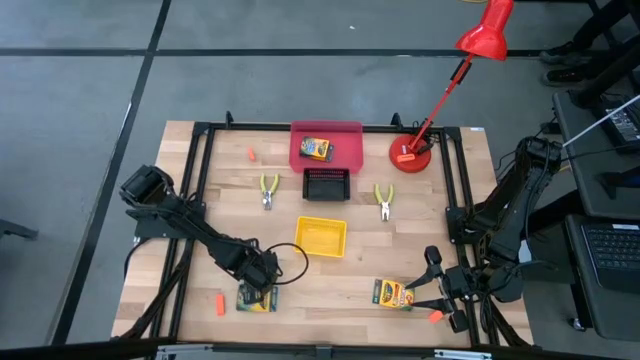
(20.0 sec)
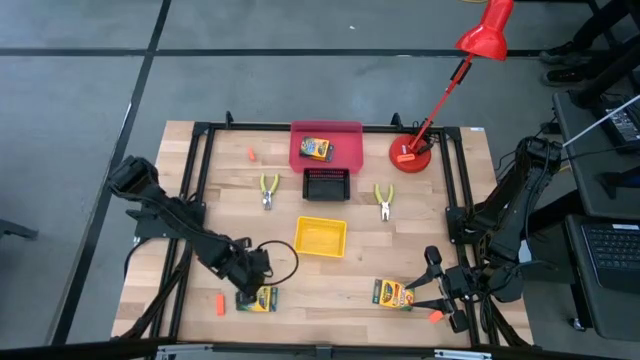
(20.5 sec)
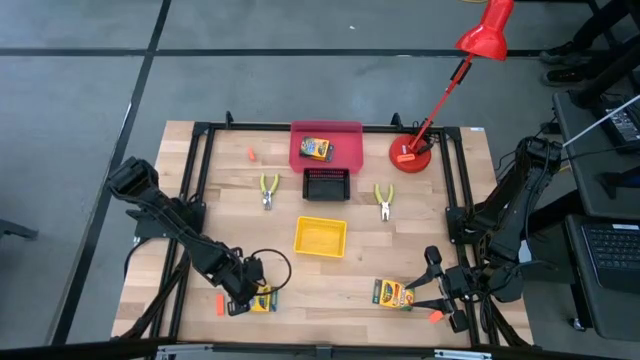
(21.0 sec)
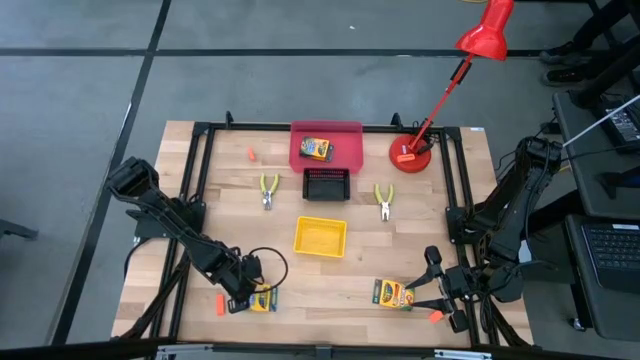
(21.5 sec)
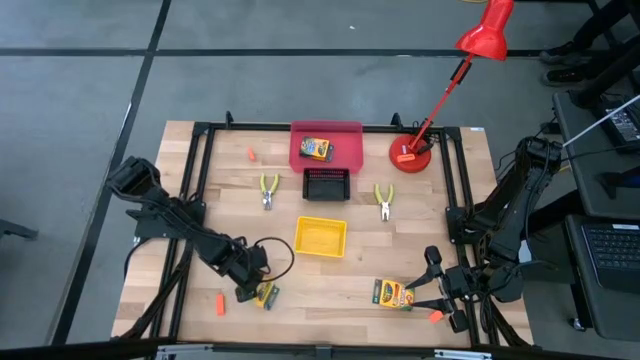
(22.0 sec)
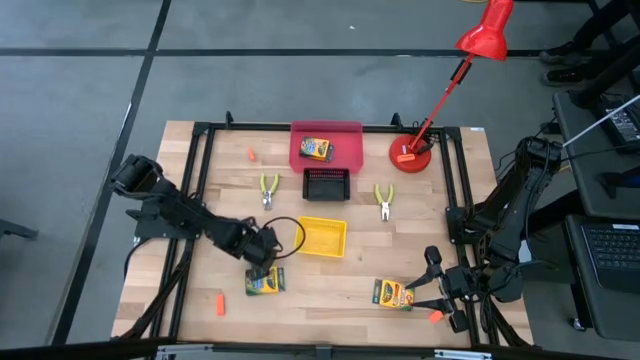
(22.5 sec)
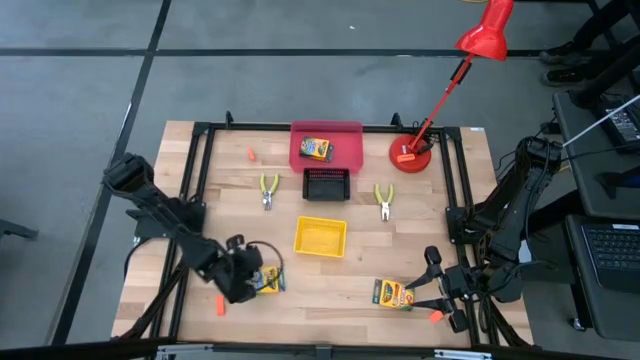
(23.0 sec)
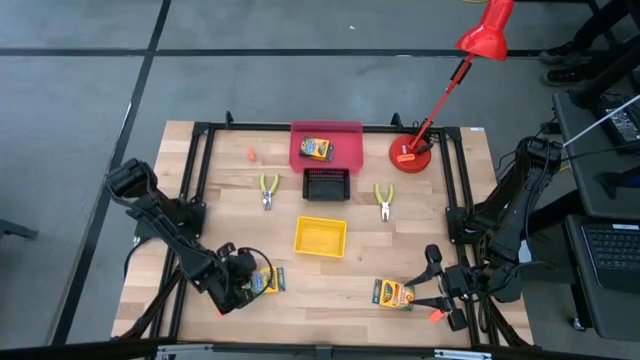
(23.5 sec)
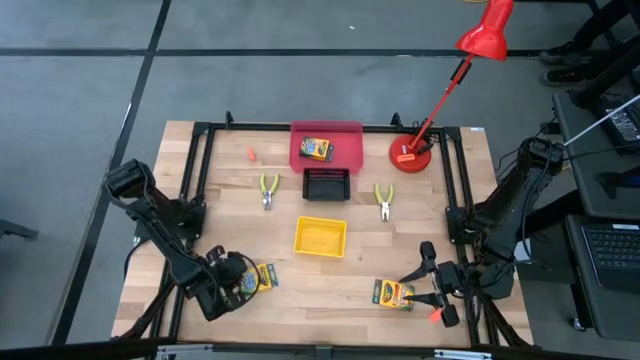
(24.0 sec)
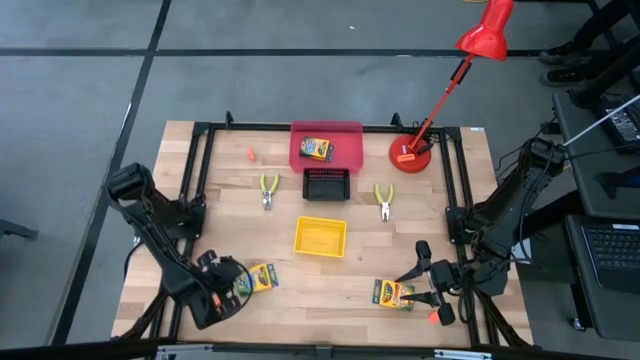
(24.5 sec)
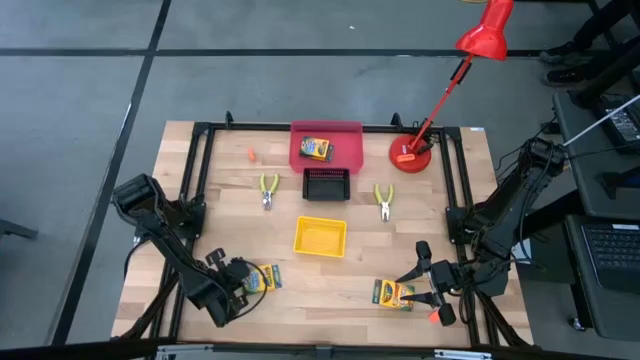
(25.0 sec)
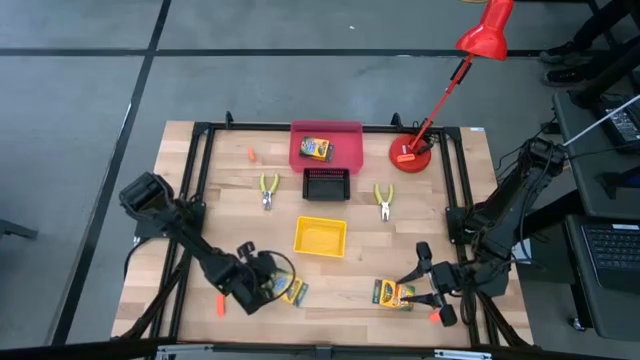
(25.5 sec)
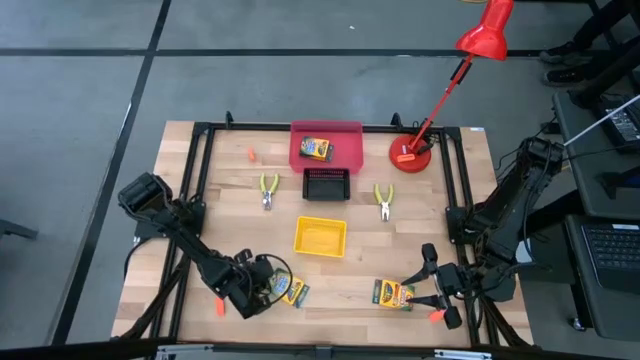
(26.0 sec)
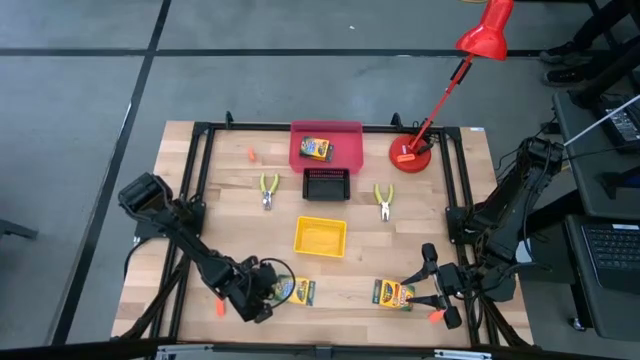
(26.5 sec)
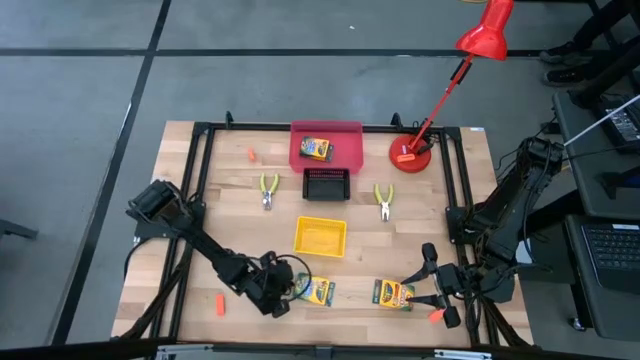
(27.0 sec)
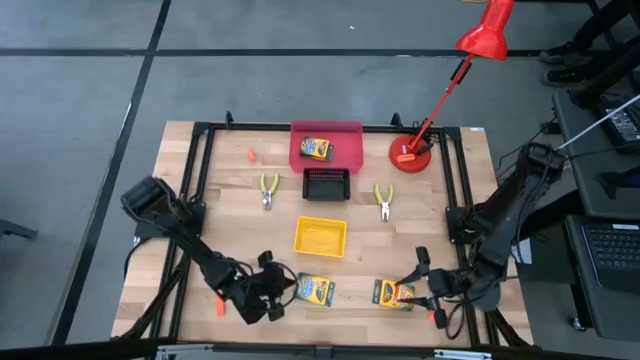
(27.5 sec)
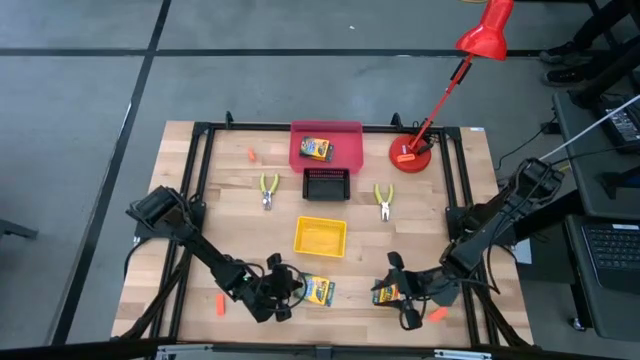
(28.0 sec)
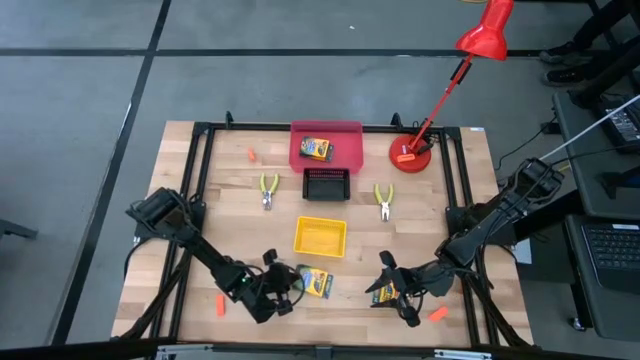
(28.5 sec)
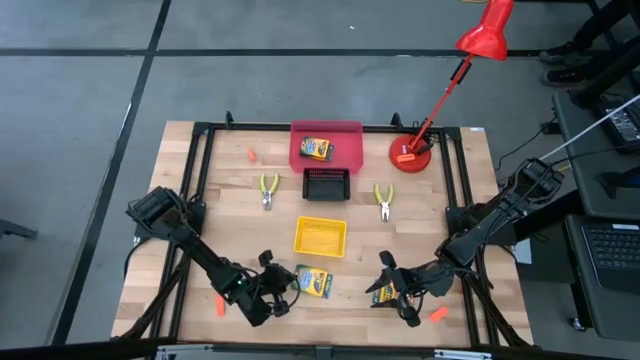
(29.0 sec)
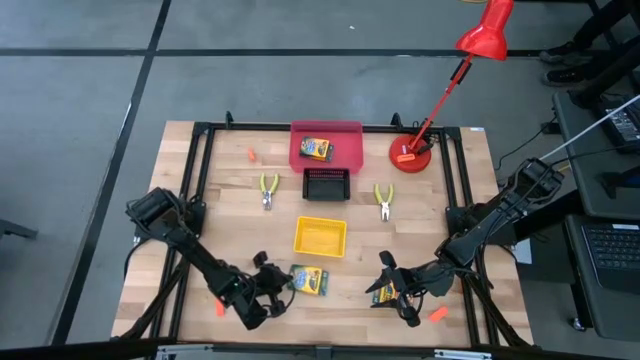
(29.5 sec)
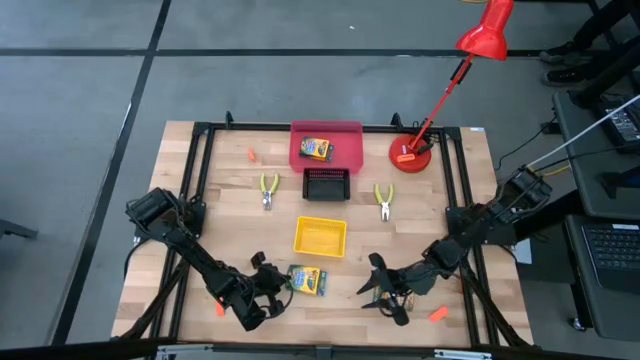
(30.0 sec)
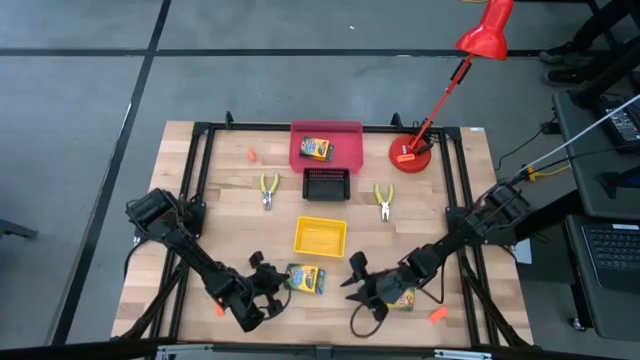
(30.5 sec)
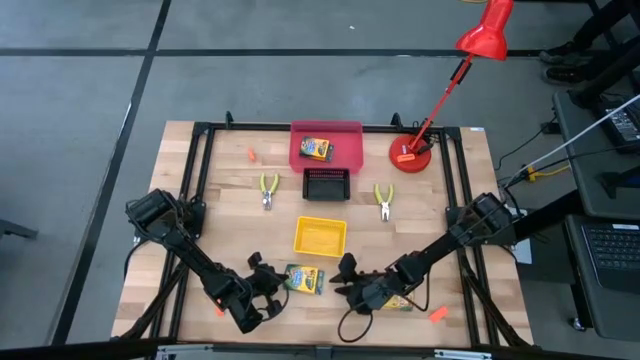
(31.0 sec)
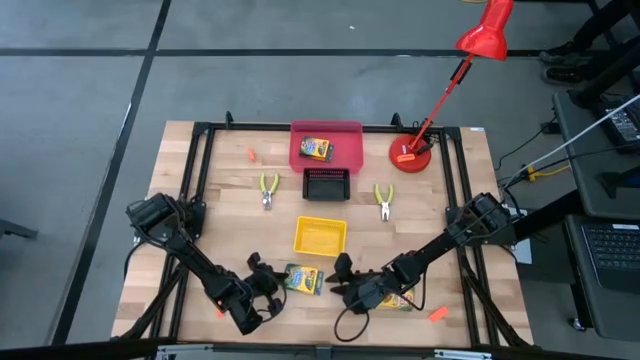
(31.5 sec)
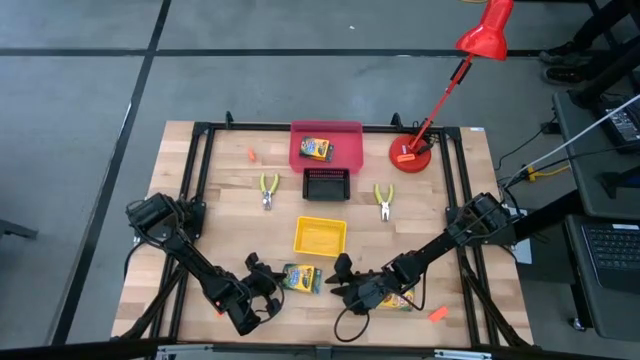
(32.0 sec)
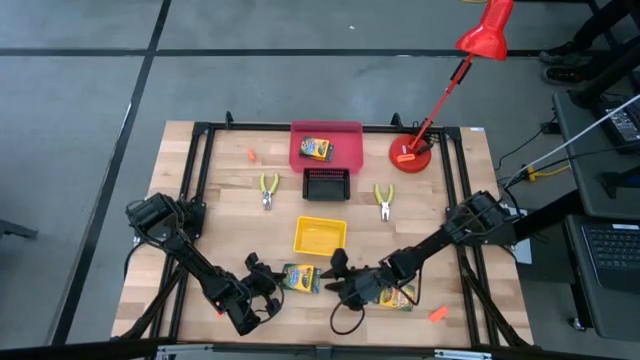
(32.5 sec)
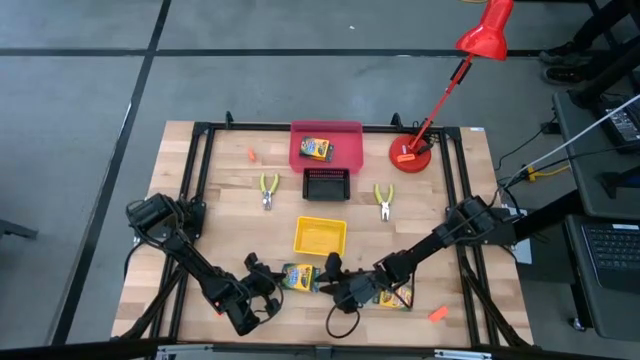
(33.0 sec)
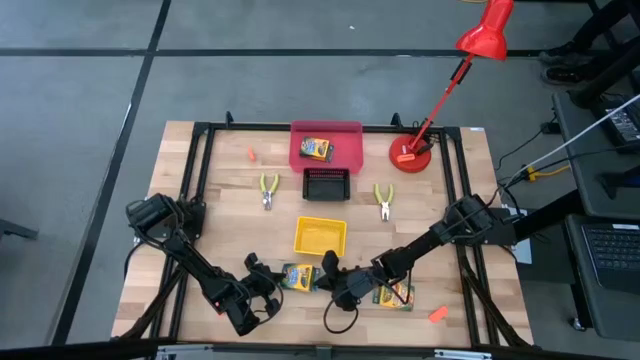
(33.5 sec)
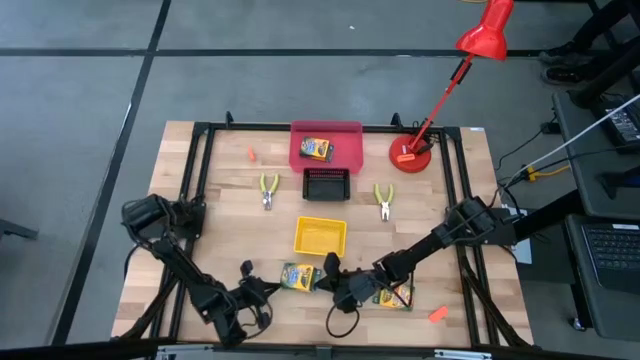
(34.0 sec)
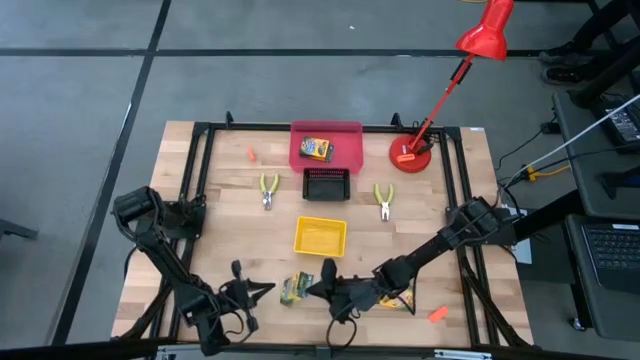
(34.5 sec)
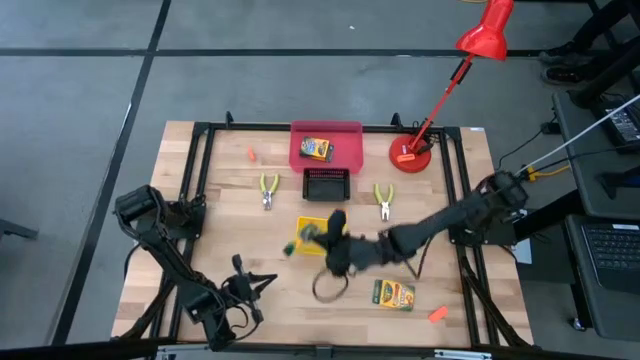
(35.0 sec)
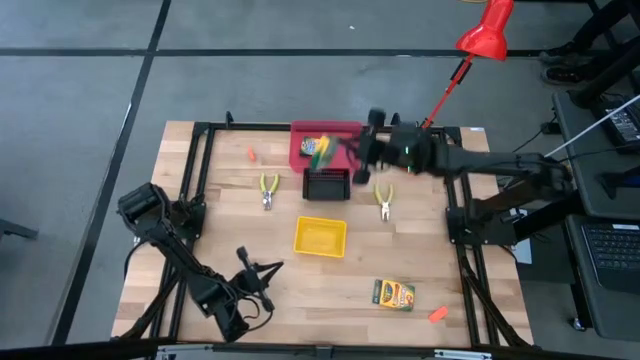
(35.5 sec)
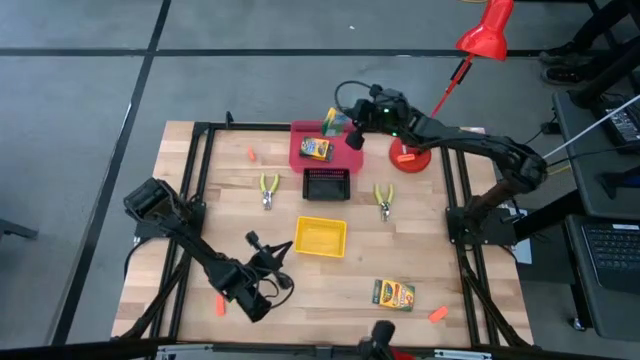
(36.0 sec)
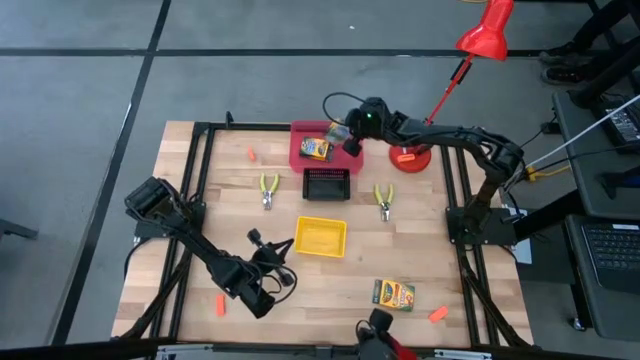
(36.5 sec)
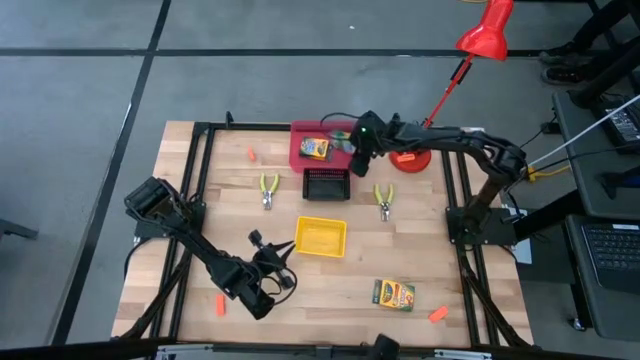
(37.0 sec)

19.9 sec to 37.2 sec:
Task: Pick & Place School Supplies
Put the yellow crayon box into the red bin

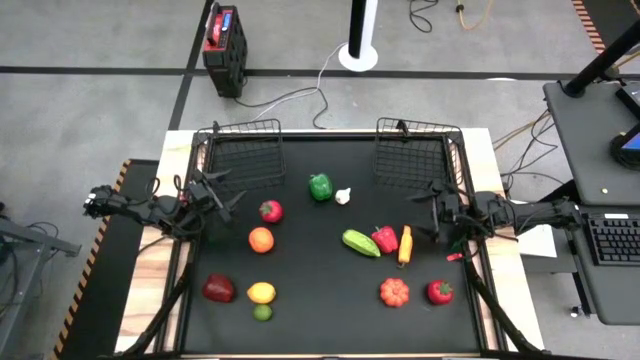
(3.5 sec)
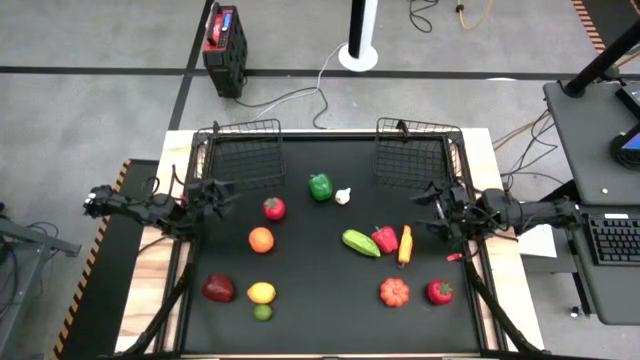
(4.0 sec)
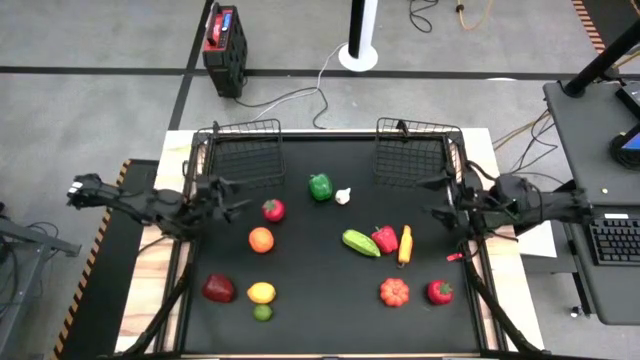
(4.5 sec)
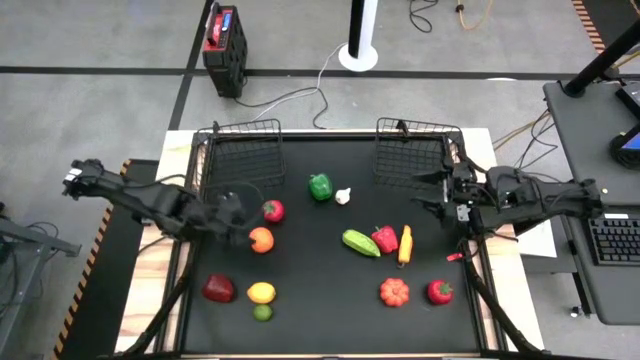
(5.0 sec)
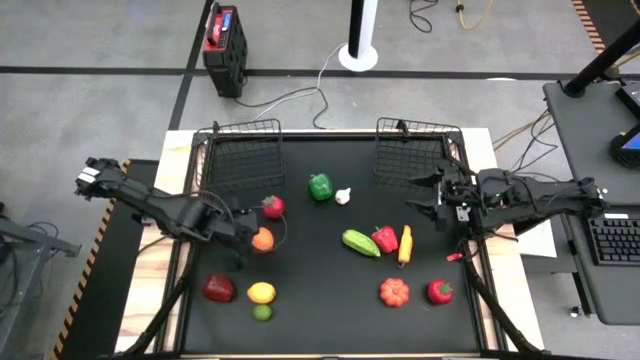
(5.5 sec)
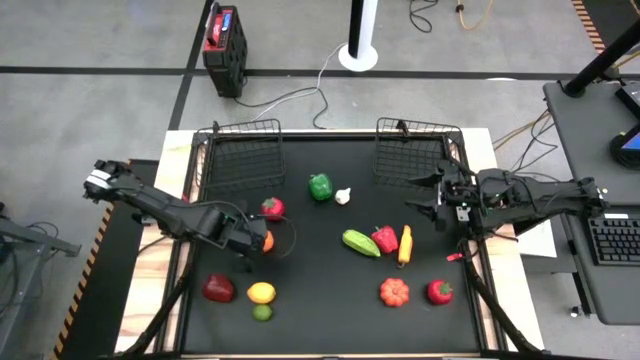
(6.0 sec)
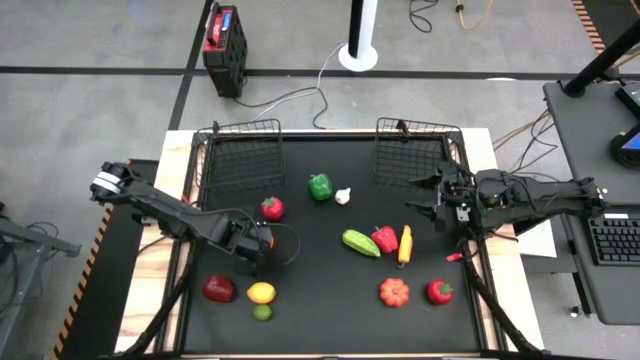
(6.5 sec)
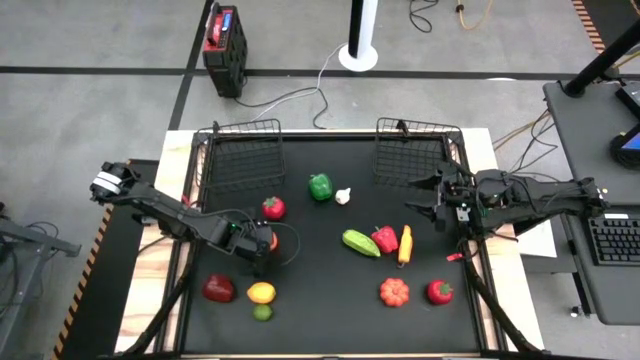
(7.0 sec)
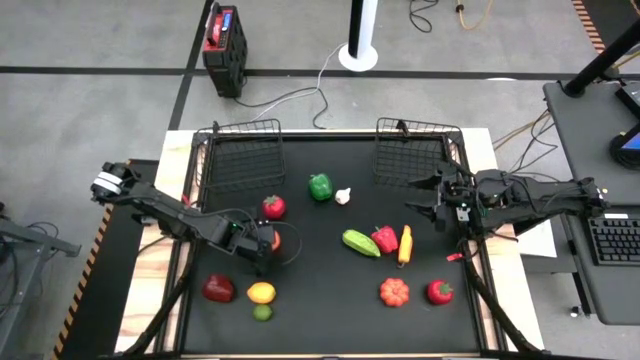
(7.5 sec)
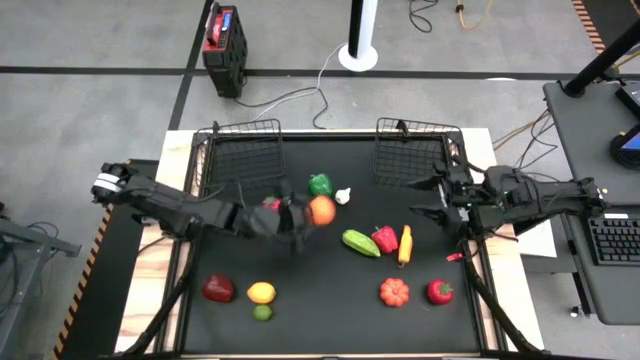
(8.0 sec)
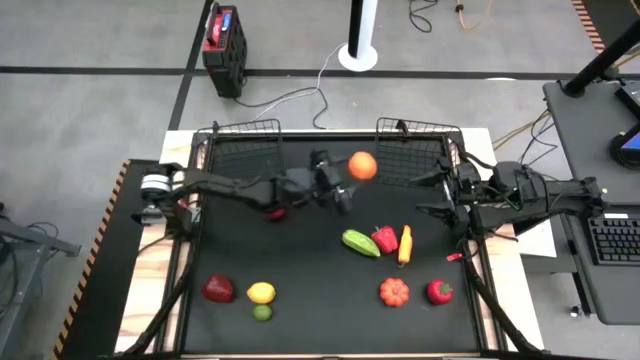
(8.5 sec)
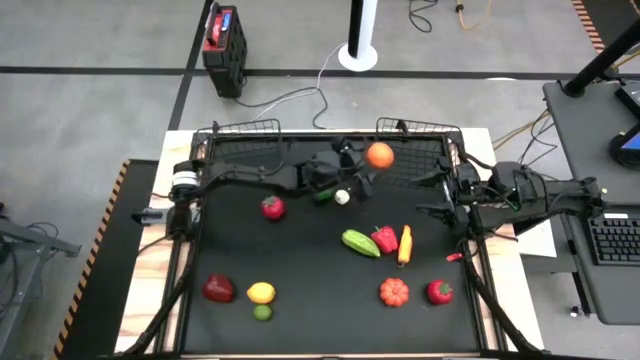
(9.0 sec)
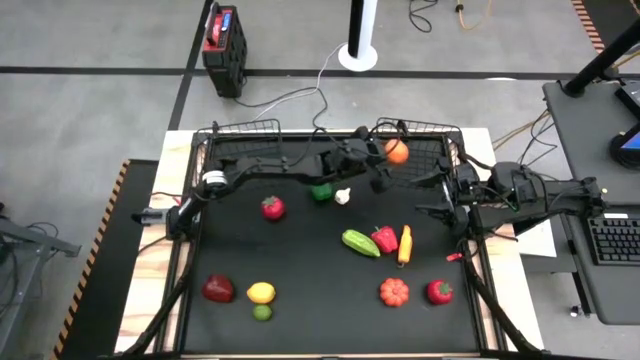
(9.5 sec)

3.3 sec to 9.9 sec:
Task: Sort produce into baskets
Put the orange into the right wire basket
